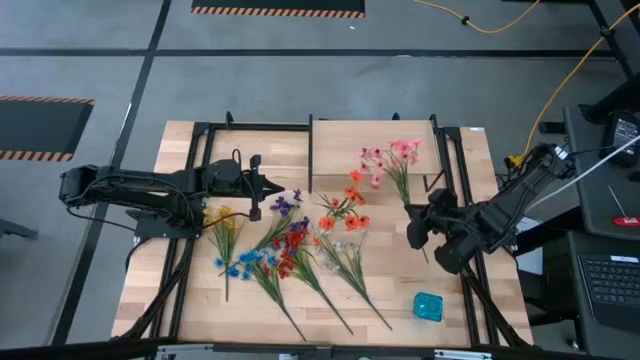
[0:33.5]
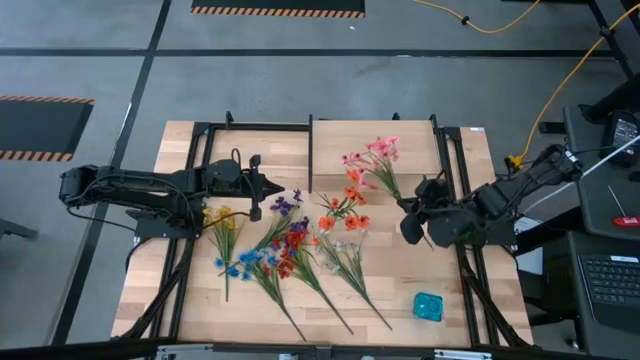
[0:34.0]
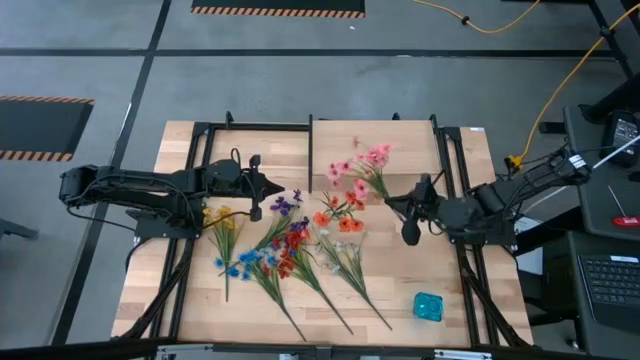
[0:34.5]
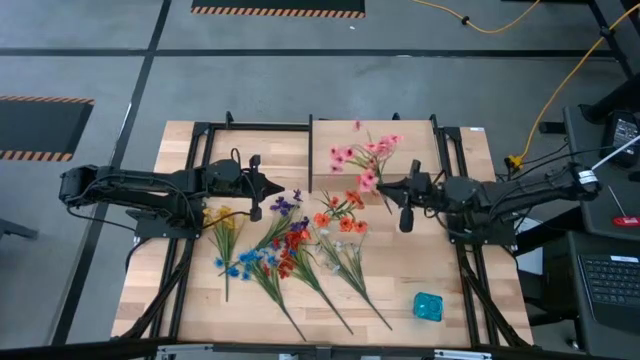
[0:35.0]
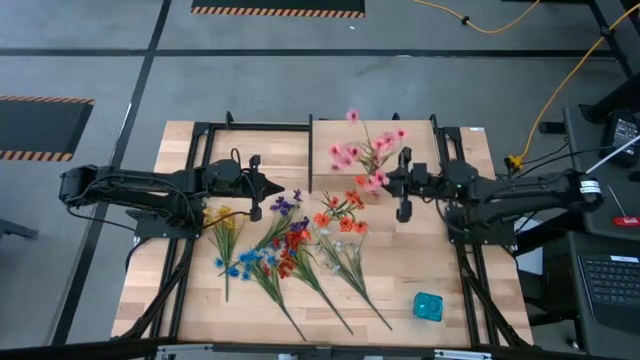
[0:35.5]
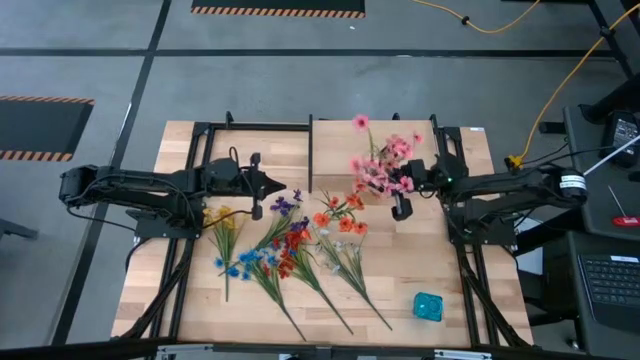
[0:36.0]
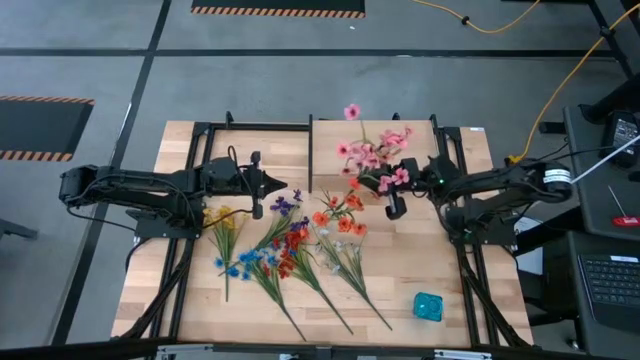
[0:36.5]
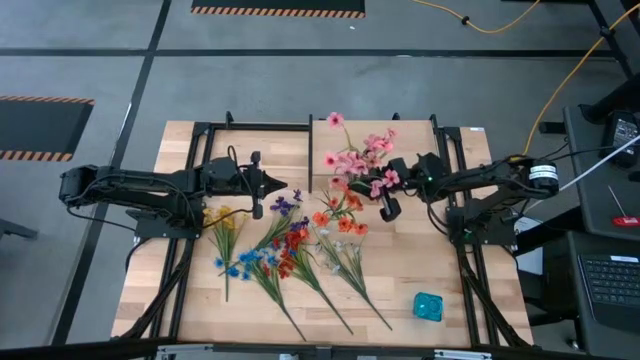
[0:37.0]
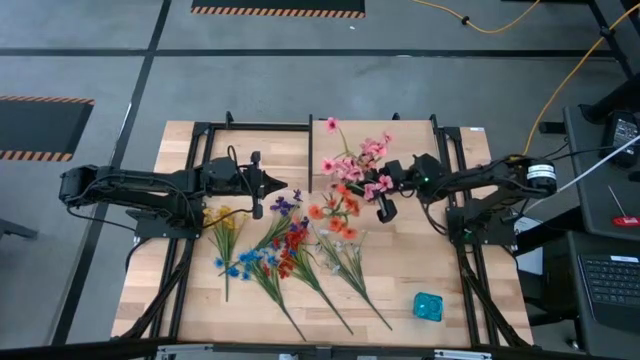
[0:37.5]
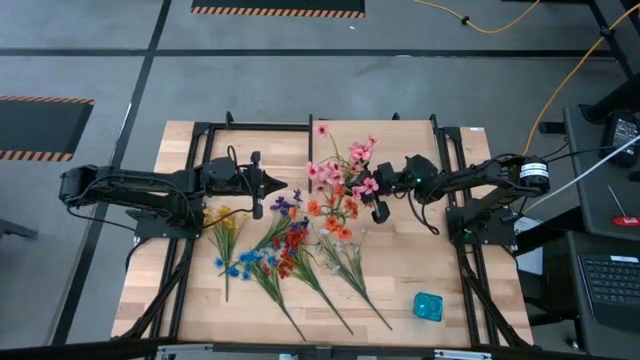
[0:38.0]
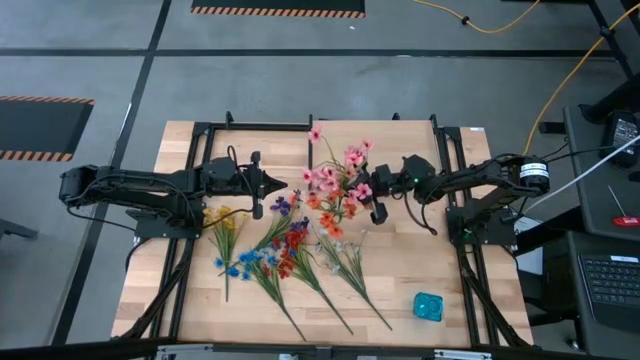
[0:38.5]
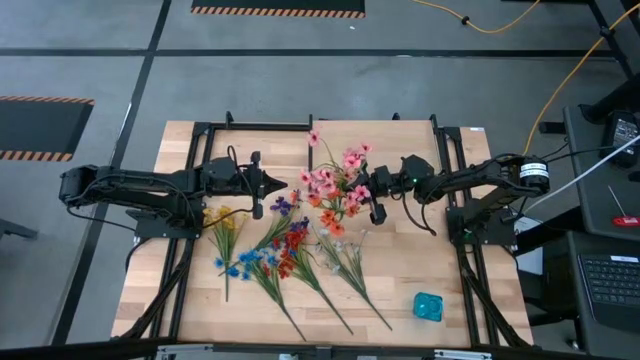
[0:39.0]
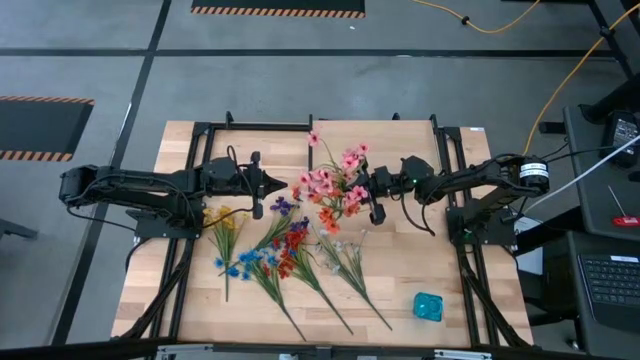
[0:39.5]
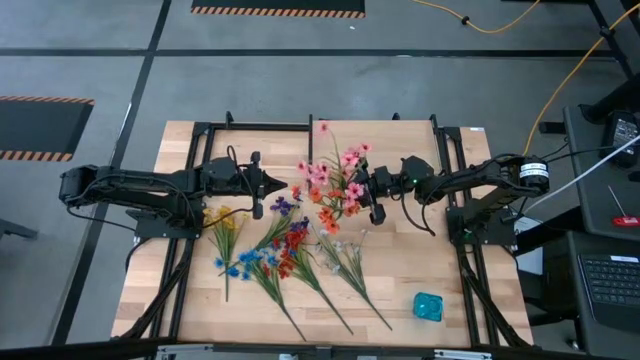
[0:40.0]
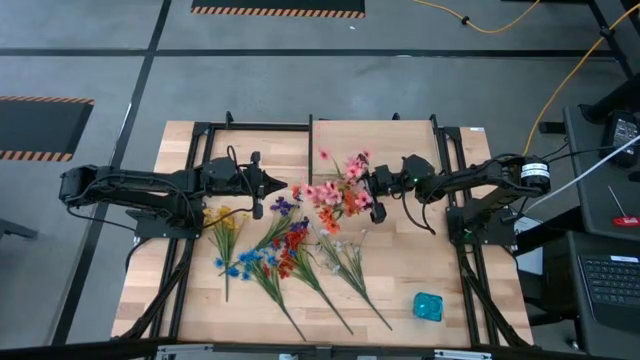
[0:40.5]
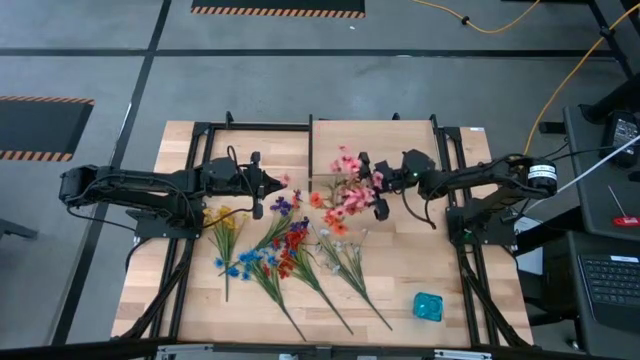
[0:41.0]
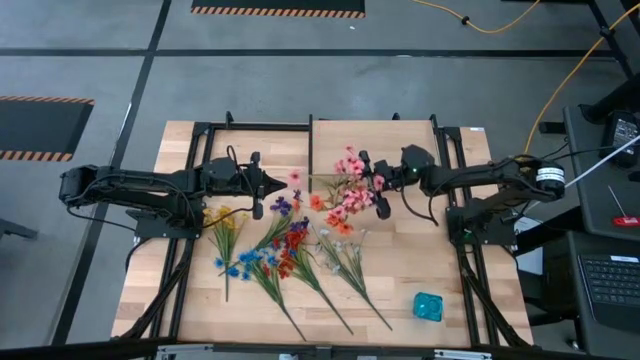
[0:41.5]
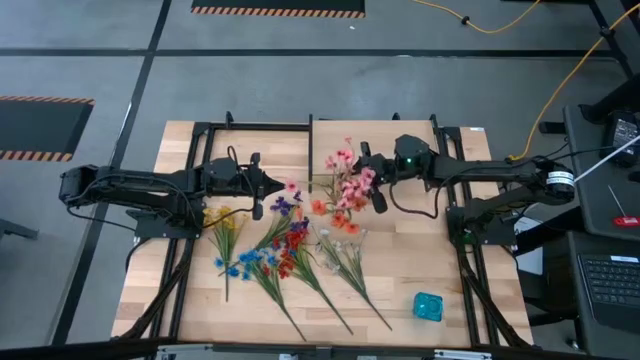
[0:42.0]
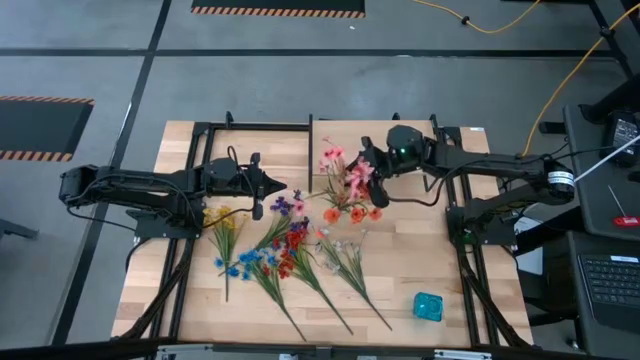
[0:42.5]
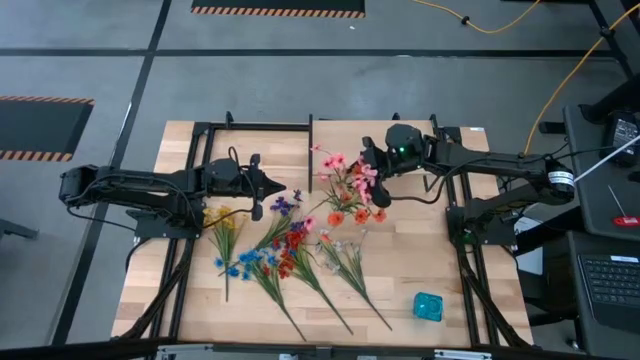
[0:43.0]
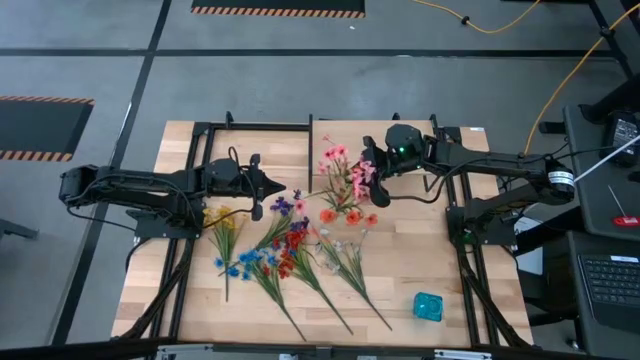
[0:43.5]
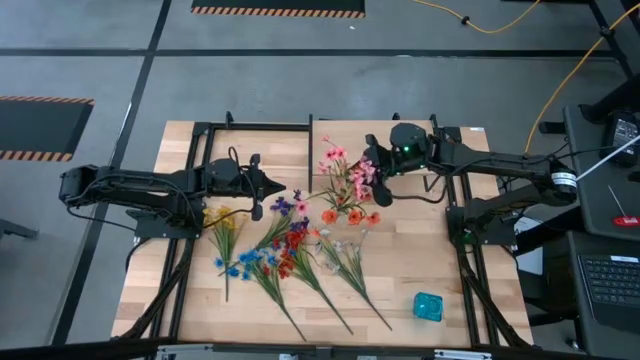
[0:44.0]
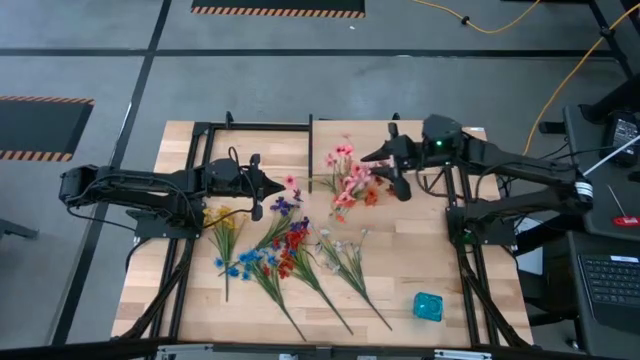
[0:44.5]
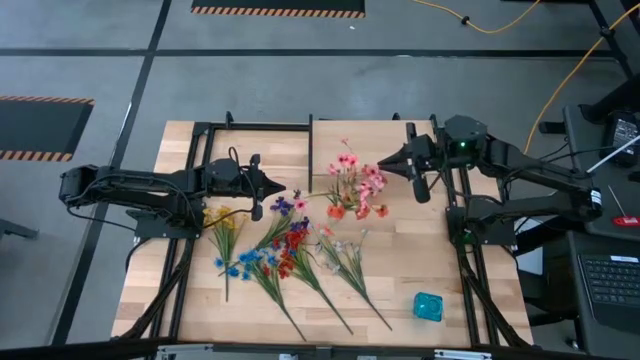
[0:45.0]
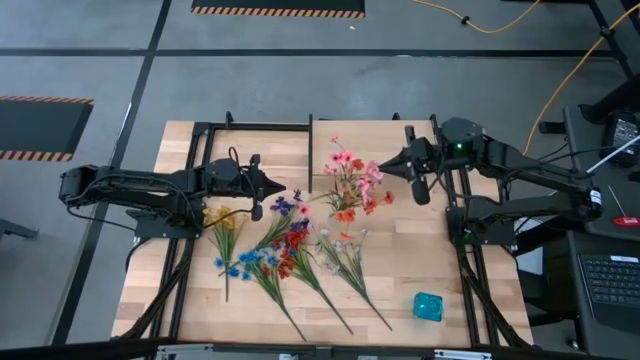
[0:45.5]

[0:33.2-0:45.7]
Task: Pick and place flowers into a vace then onto a shelf
Put the pink flowers into the transparent vase

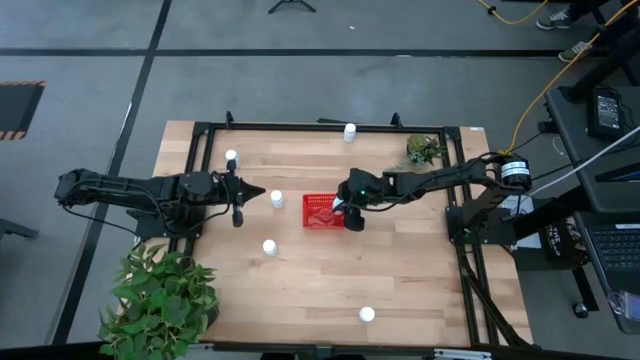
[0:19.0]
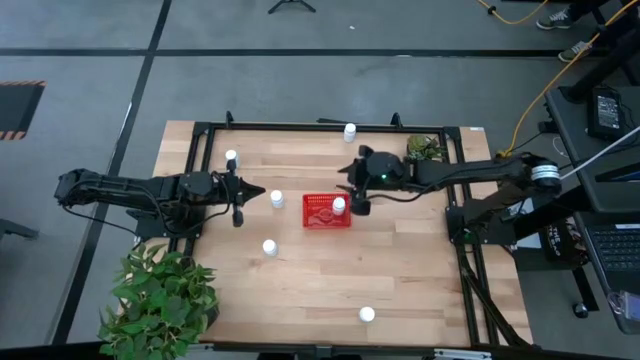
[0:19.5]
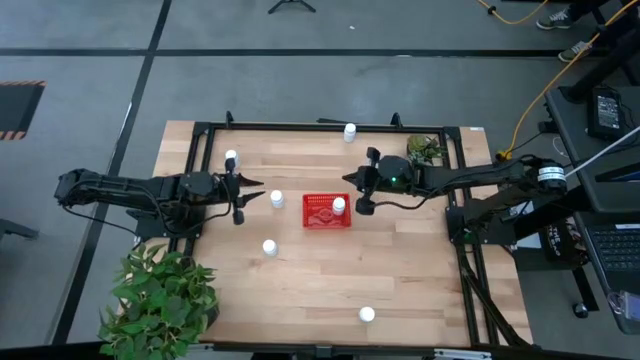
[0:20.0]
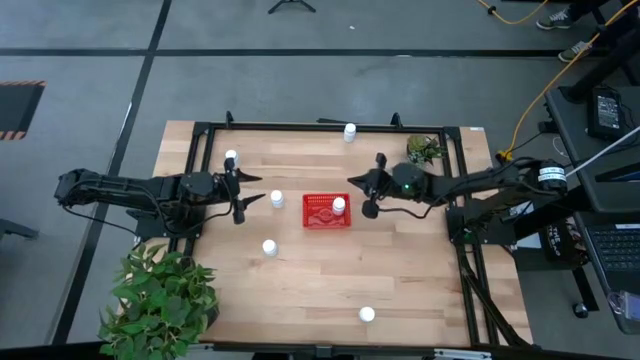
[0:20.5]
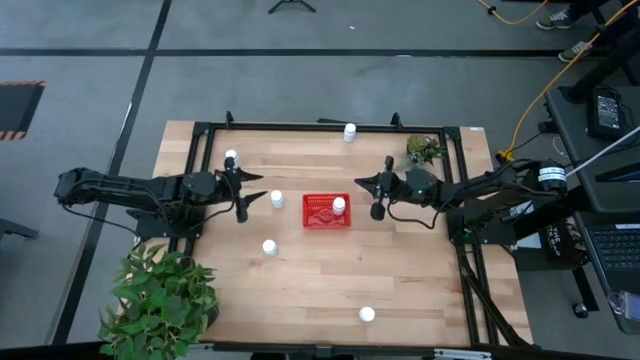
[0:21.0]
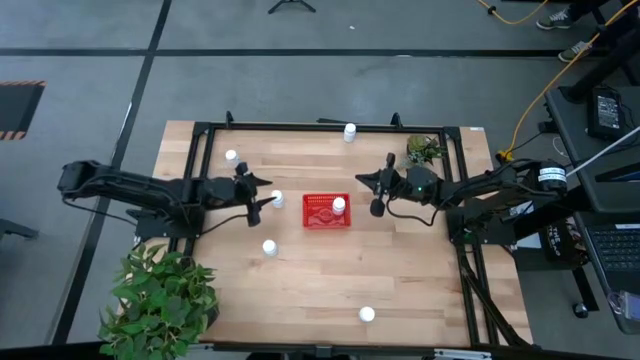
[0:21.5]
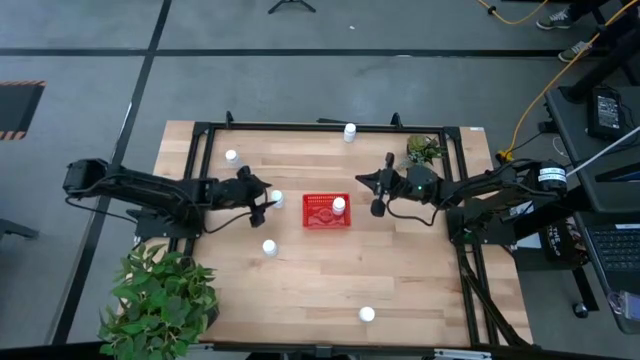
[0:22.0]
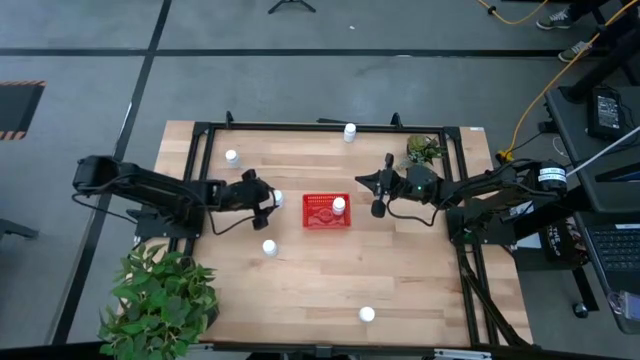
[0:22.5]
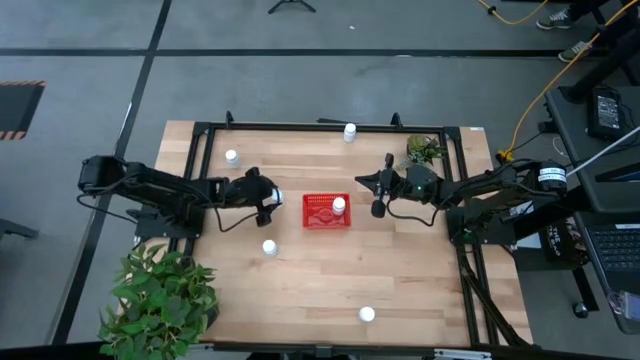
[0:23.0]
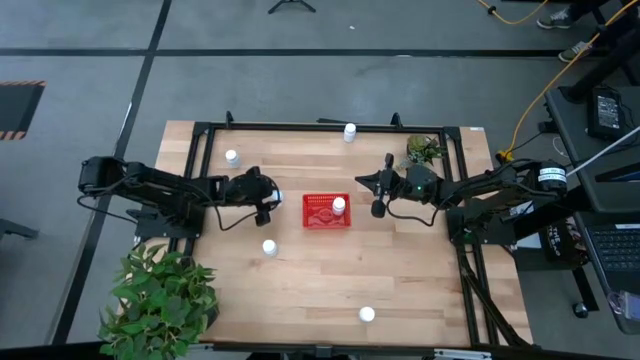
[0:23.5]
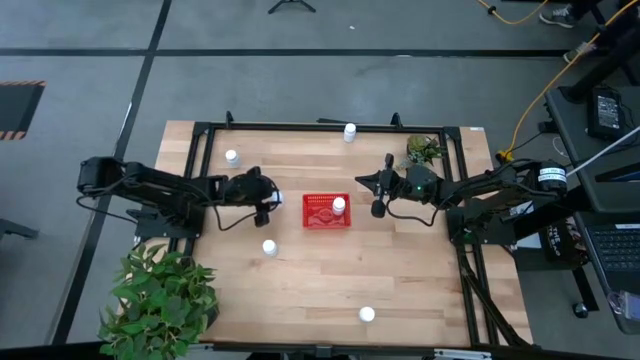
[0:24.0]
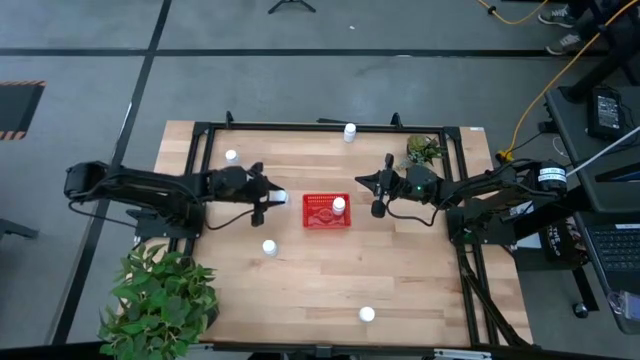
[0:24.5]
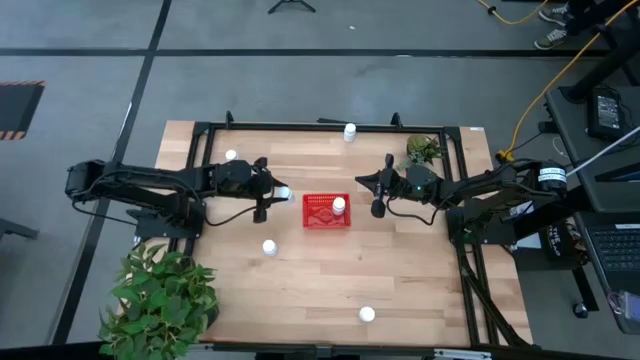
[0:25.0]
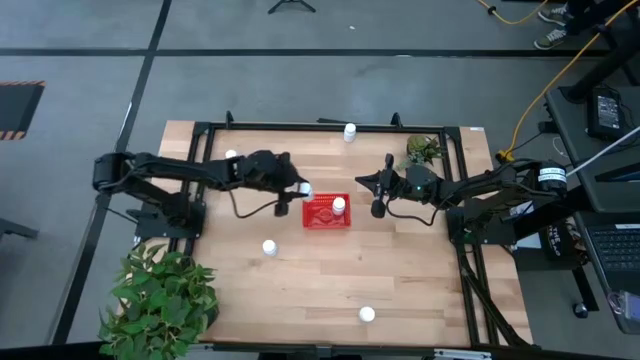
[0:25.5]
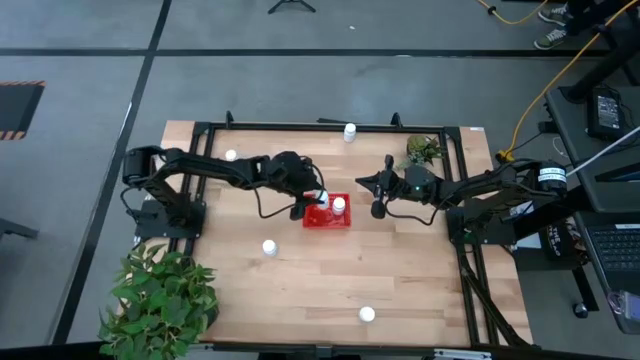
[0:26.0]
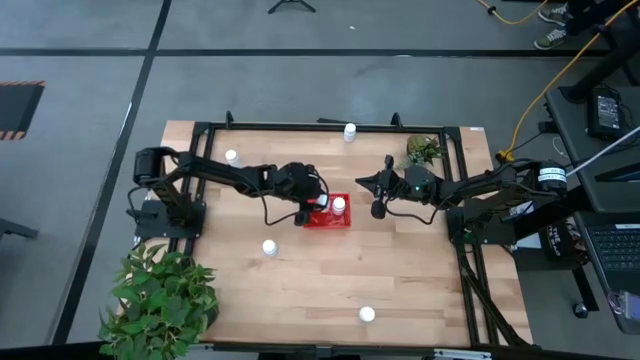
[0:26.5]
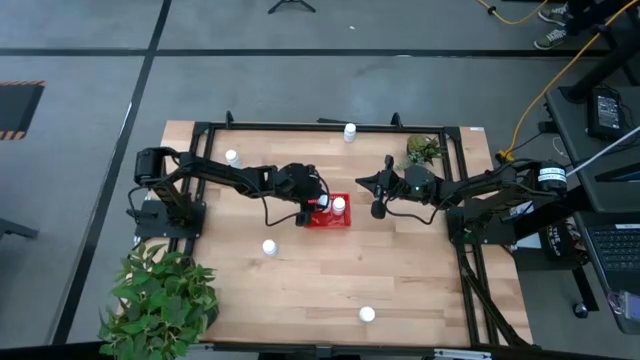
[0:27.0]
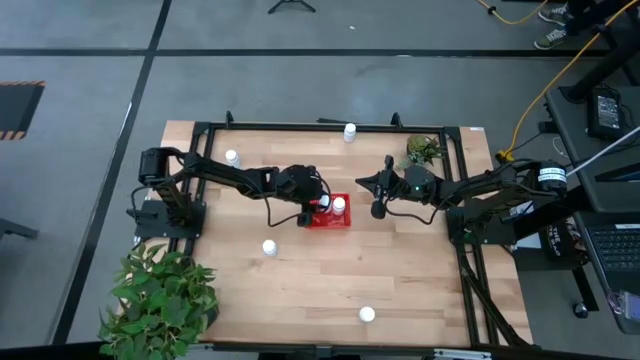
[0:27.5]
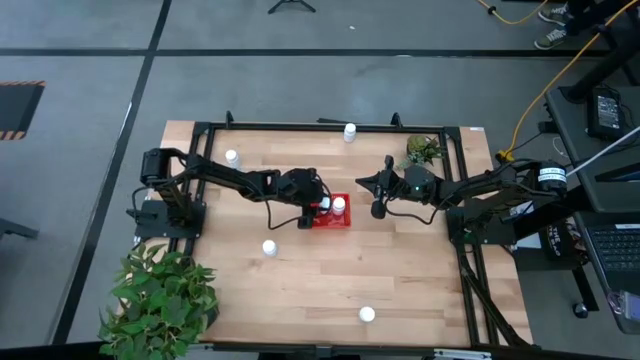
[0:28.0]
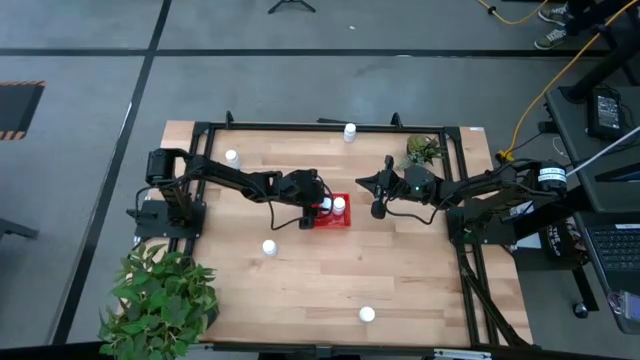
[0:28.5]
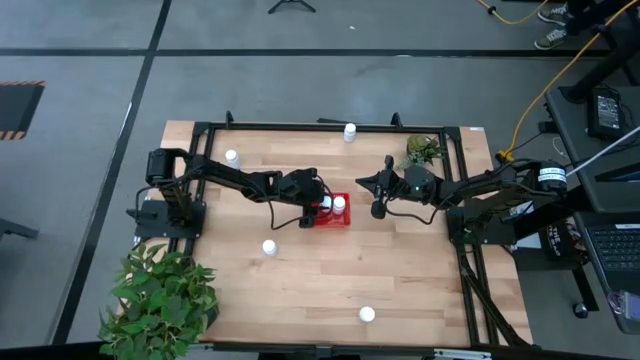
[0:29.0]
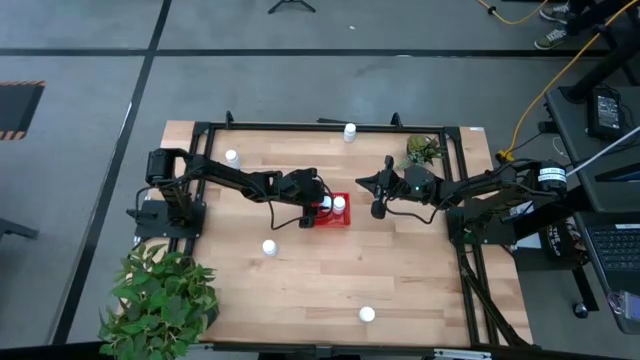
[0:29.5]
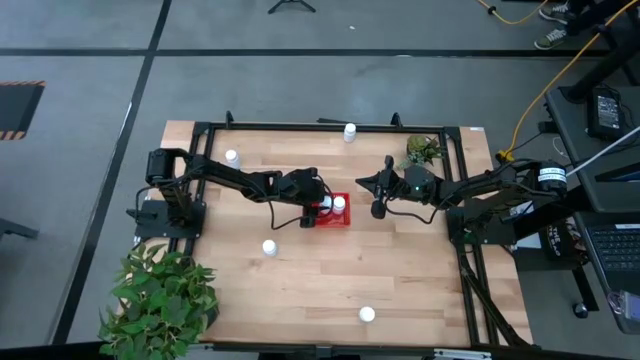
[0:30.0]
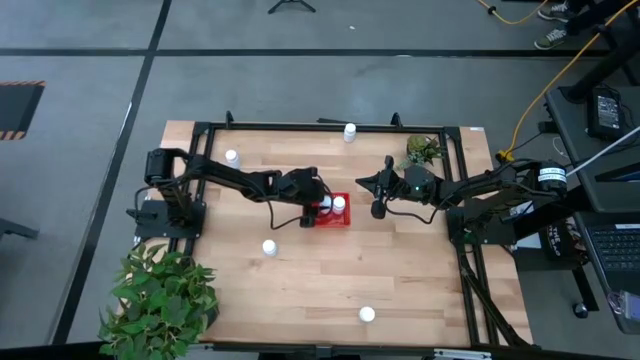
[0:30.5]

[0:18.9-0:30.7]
Task: Pick and place pill bottles into a basket
Put the white pill bottle into the red basket
